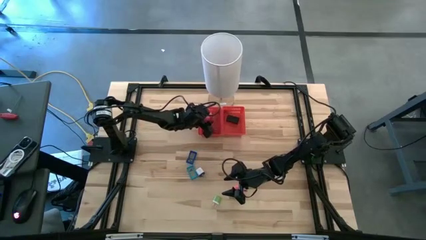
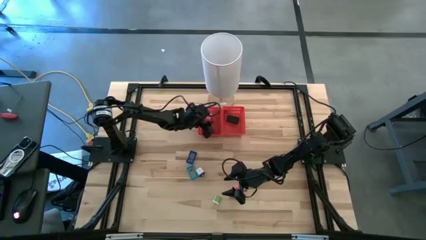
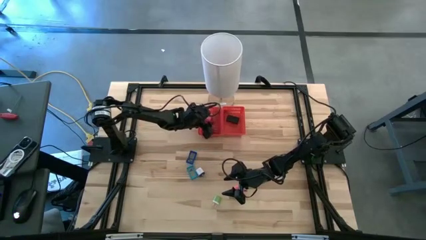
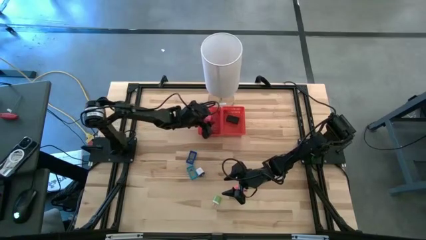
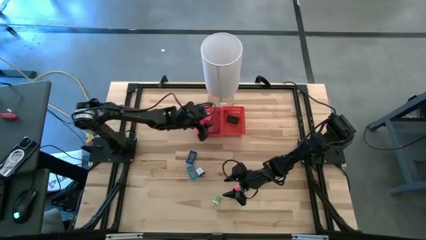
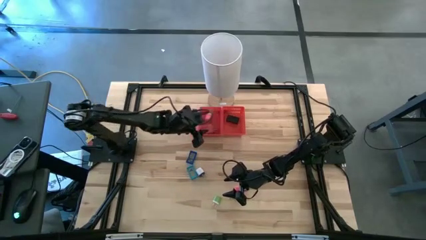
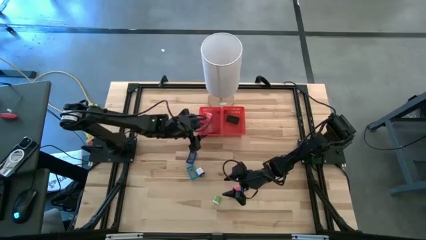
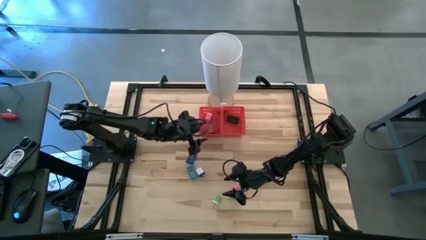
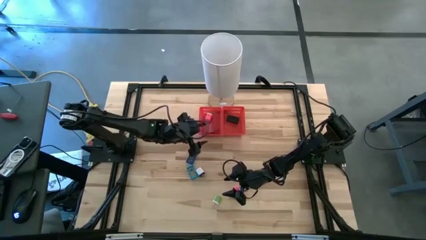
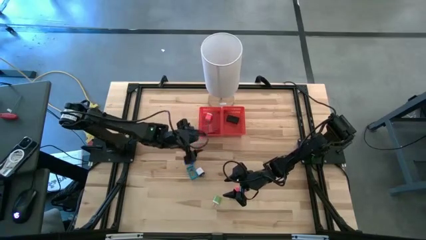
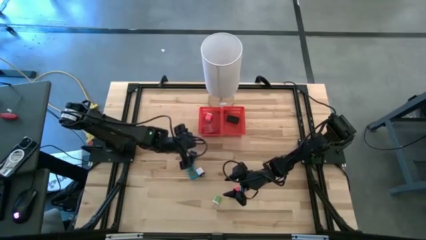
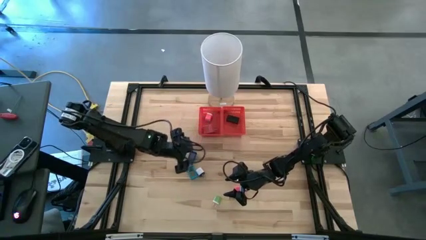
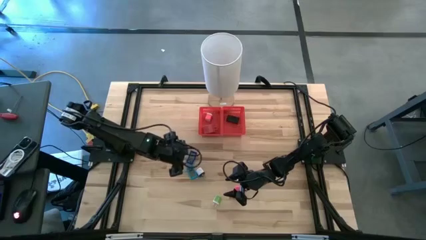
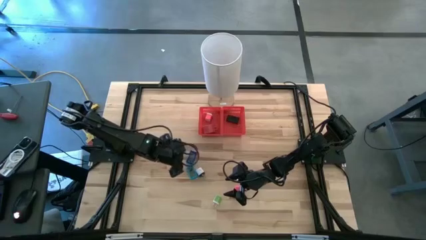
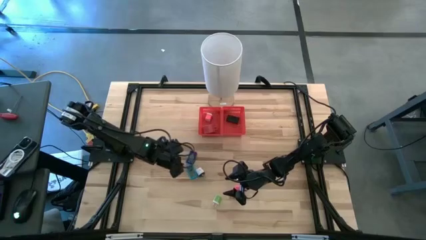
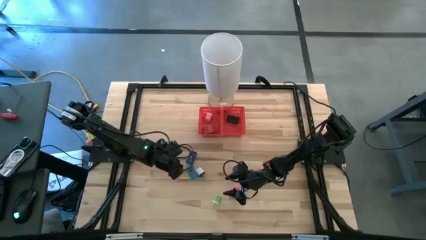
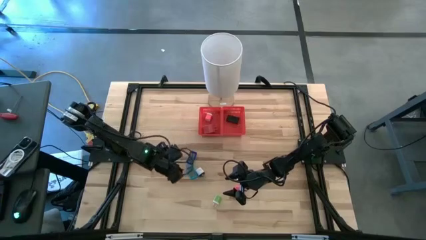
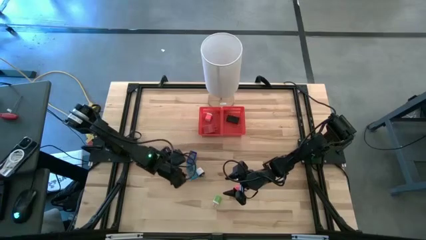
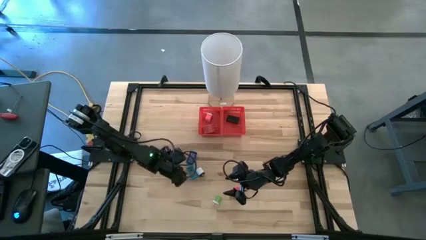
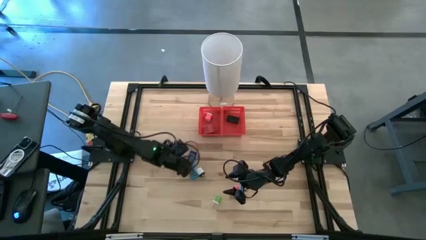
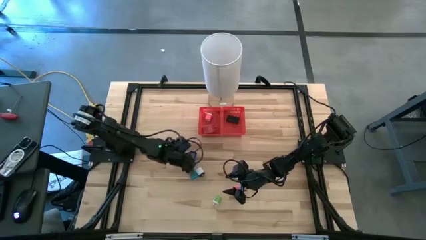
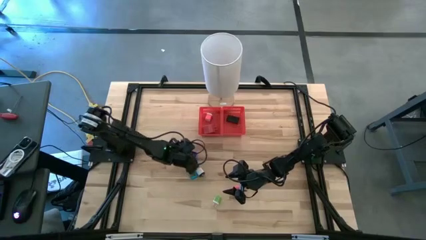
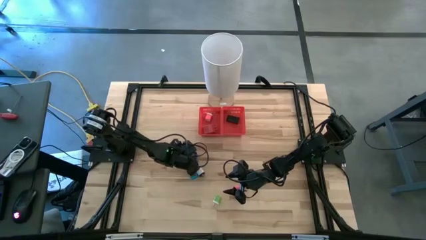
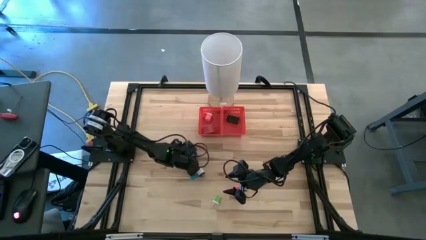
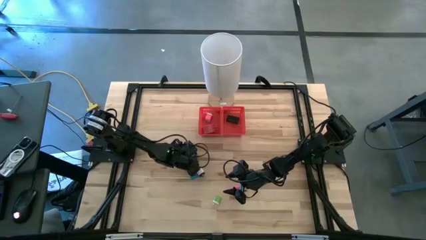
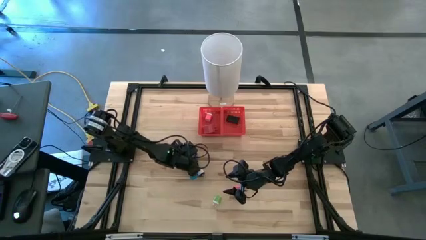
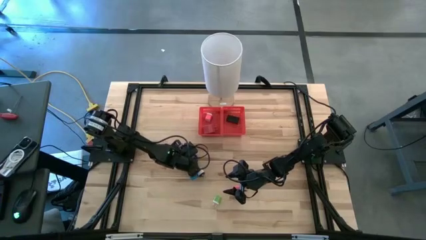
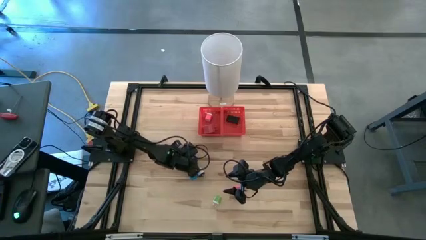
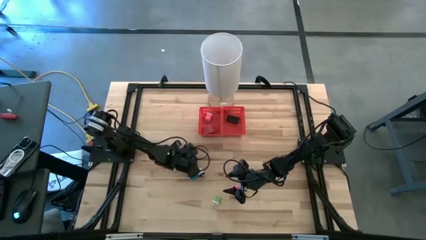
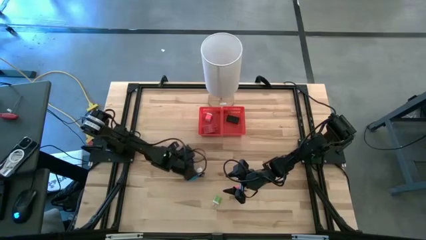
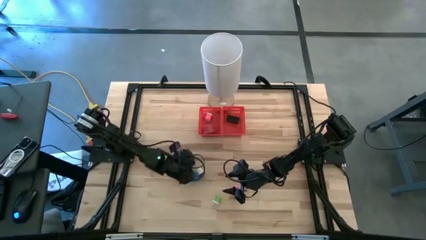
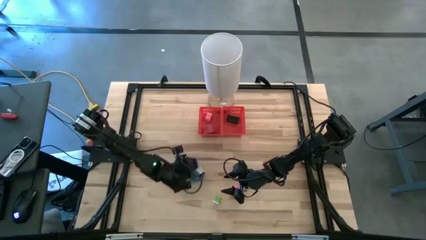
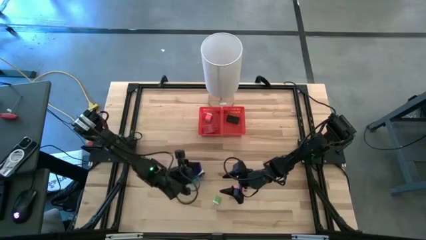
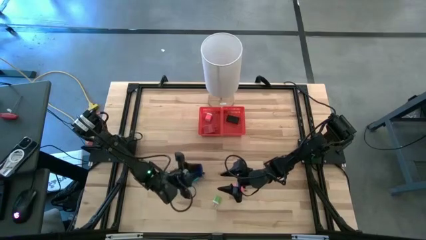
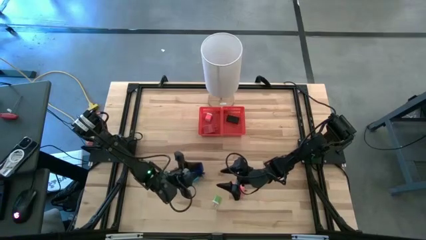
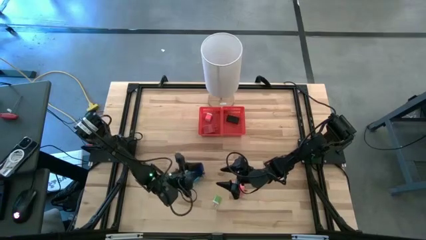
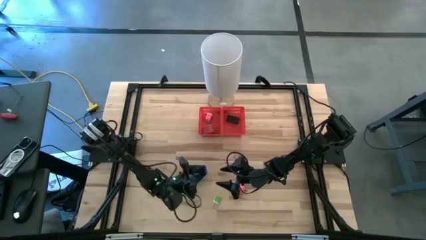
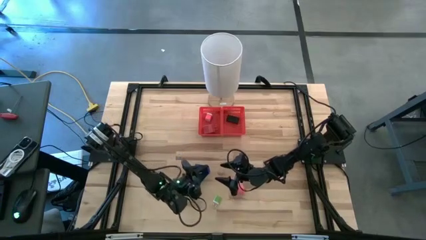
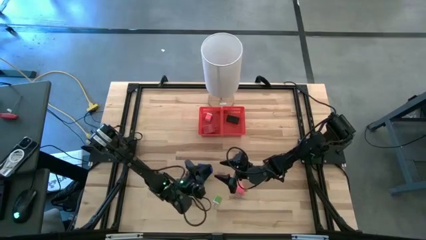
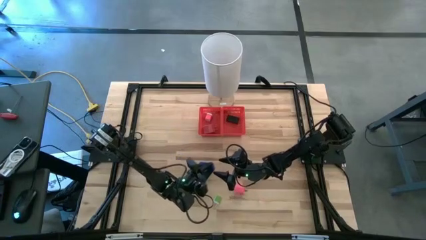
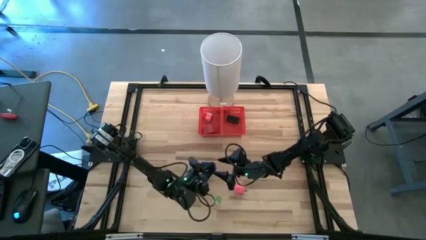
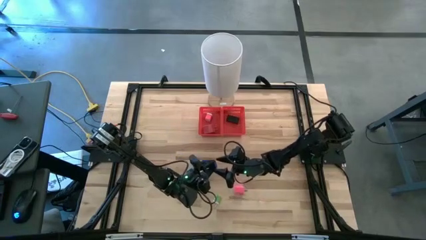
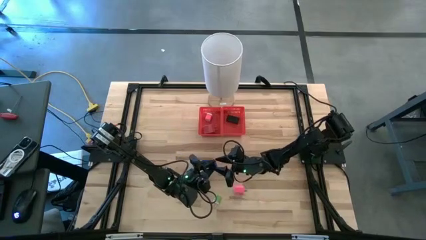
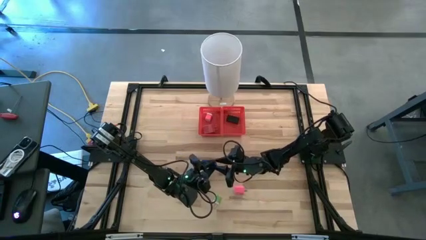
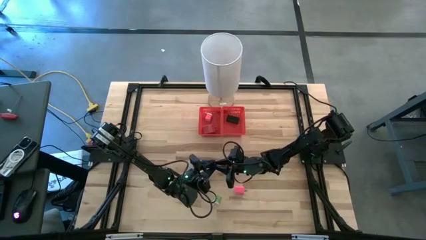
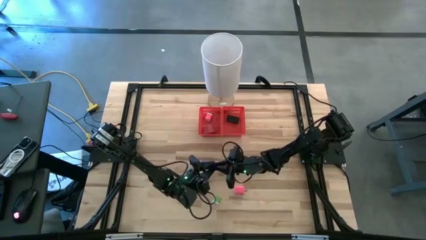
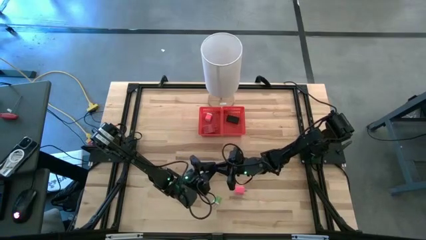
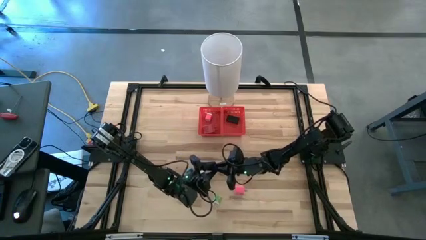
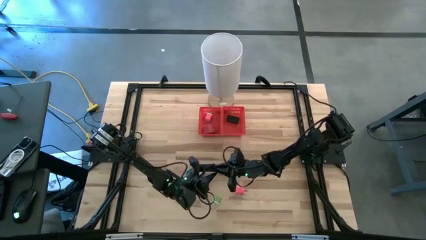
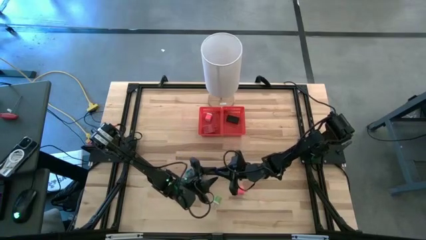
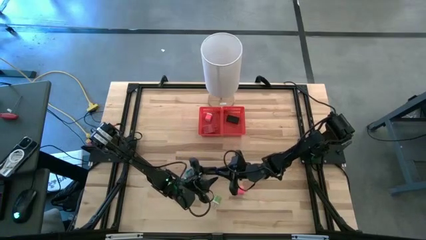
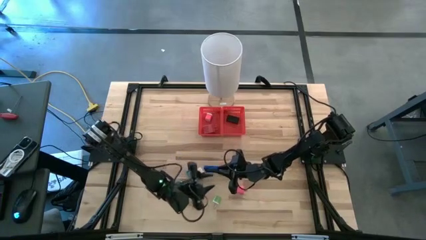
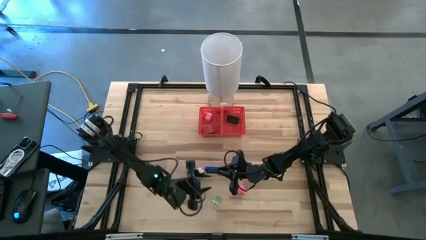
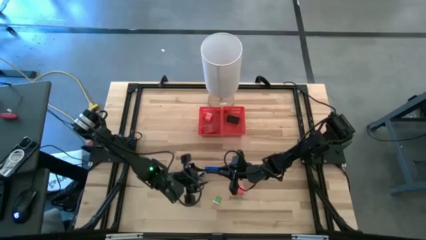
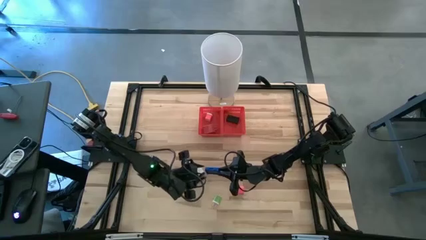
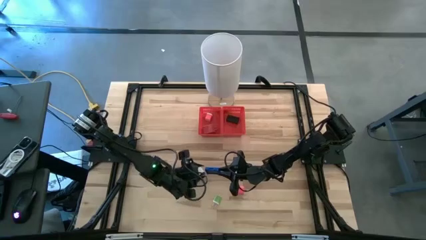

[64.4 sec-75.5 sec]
Task: Pick & Place Office items
Put the dark blue digital clock into the right red bin

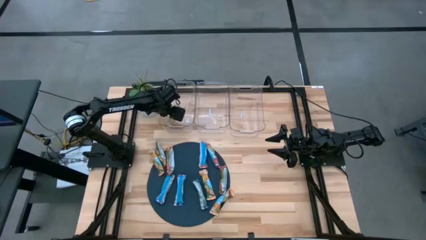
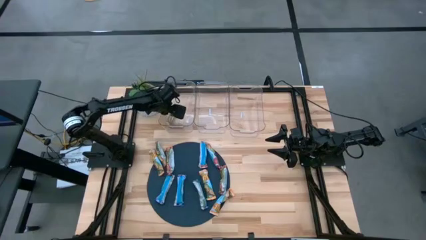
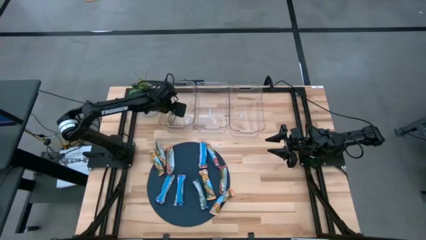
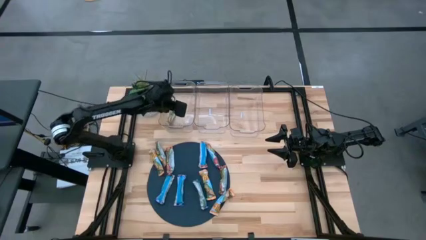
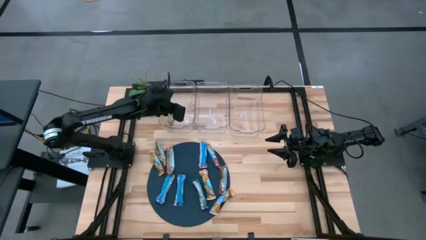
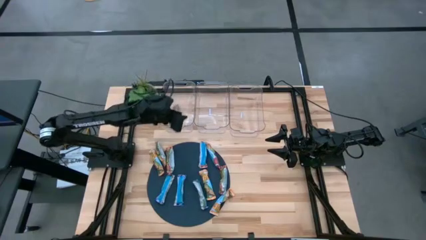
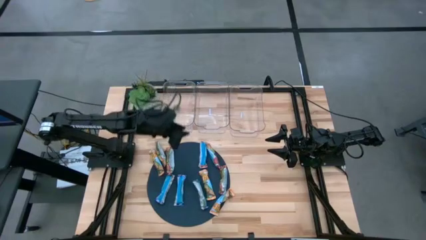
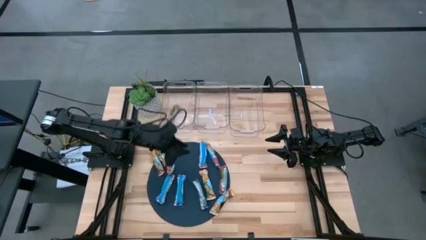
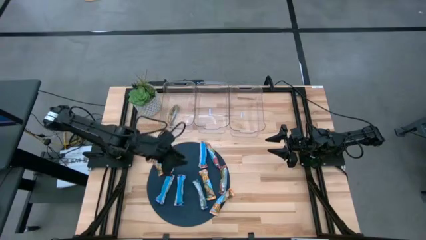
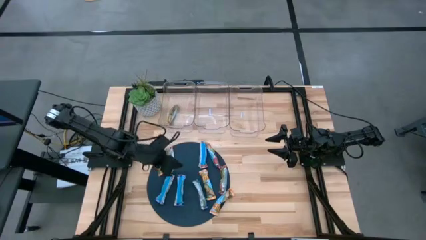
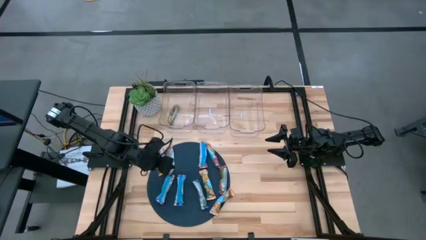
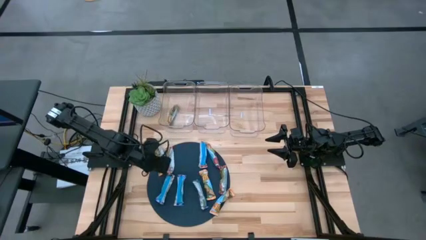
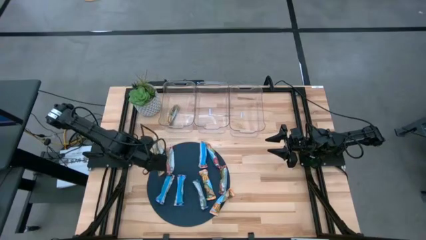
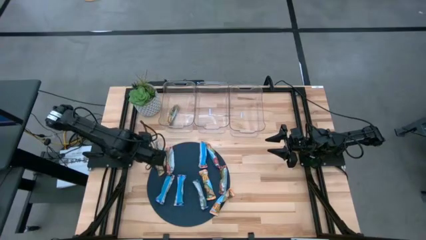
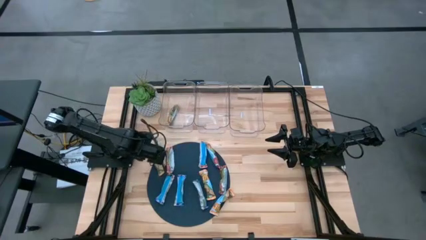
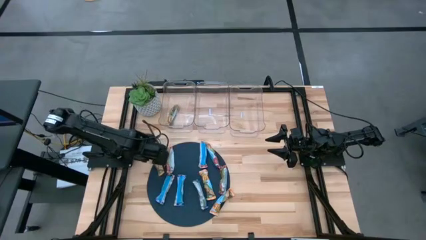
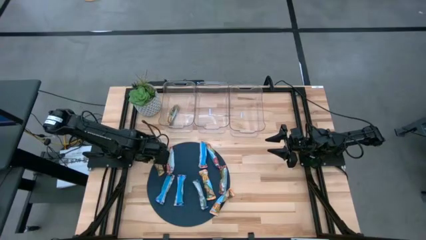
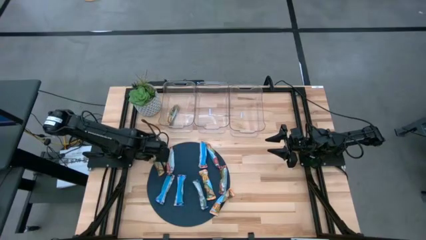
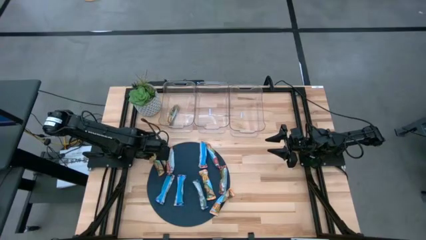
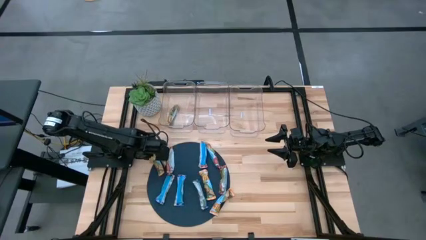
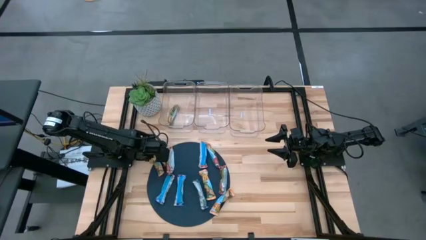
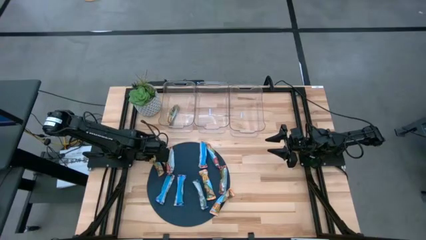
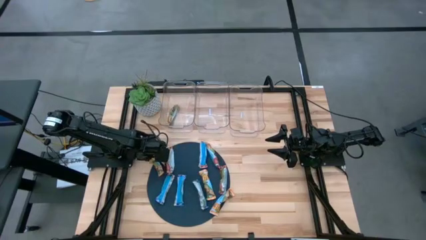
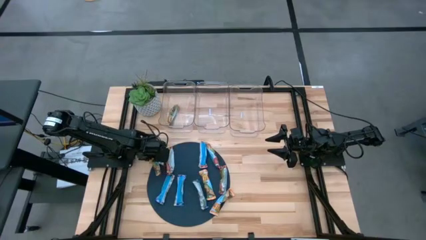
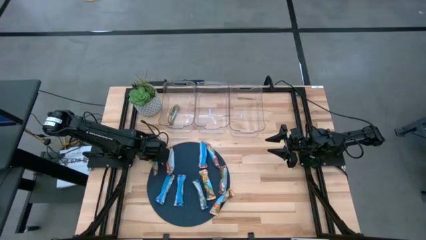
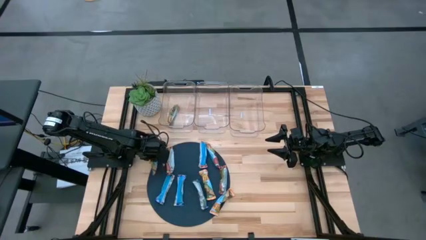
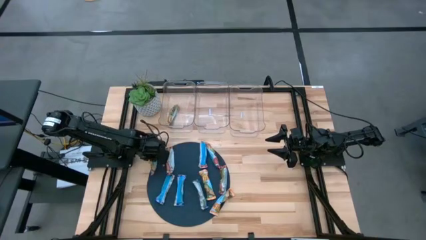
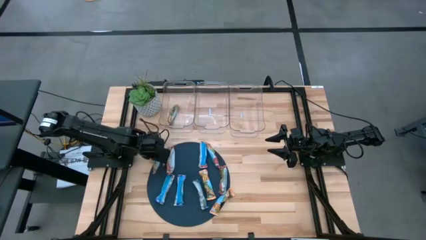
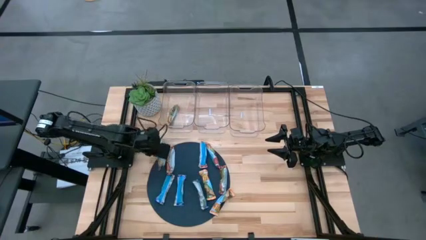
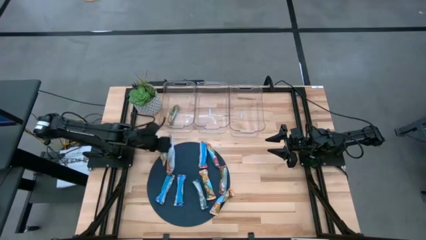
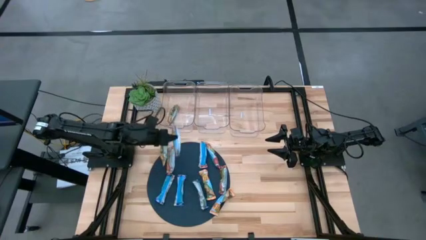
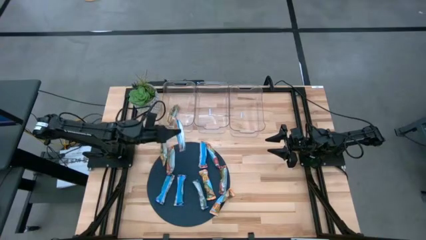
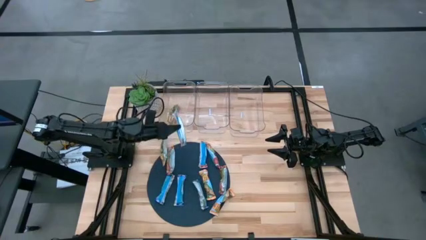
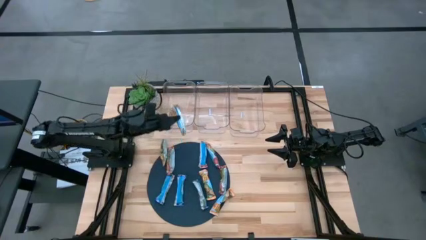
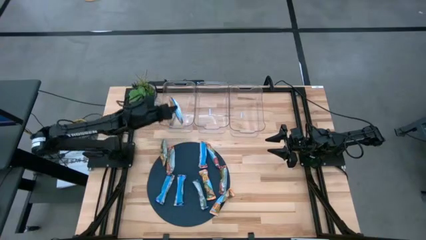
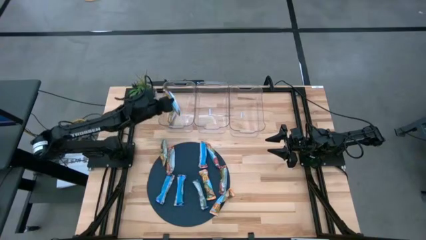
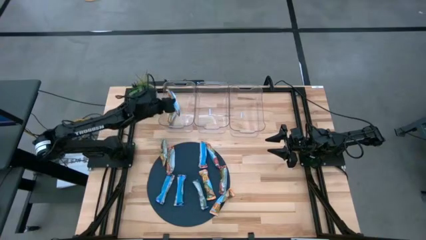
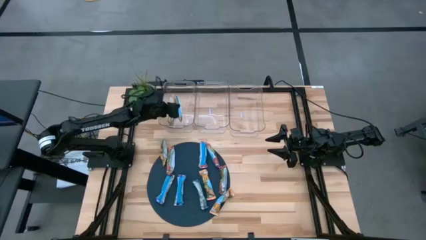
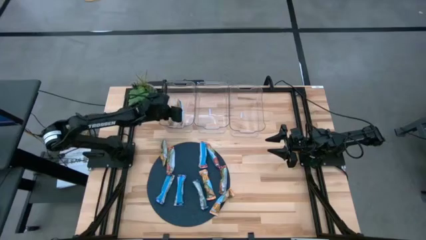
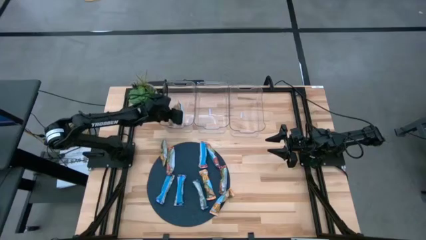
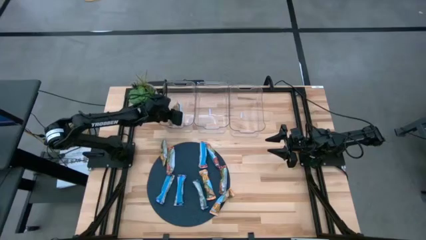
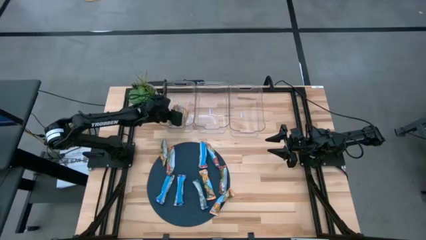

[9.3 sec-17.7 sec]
Task: Pick and place Granola Bars by type
Put the orange granola bar into the left transparent bin
